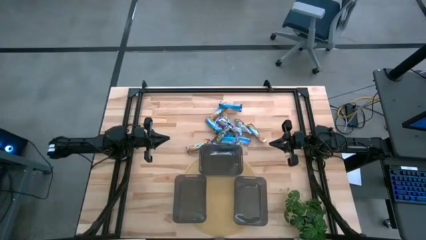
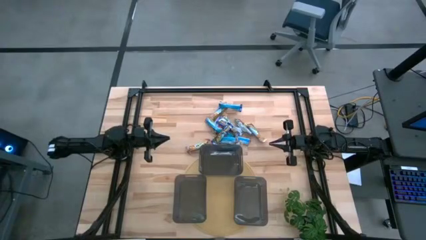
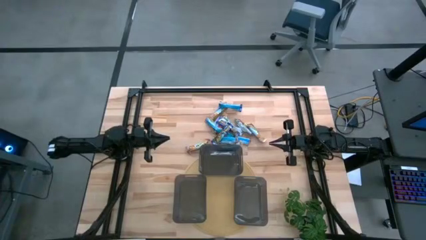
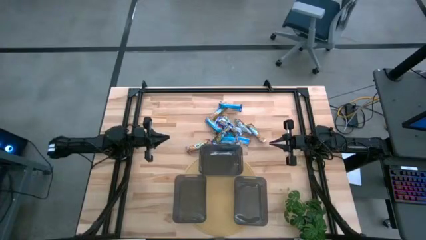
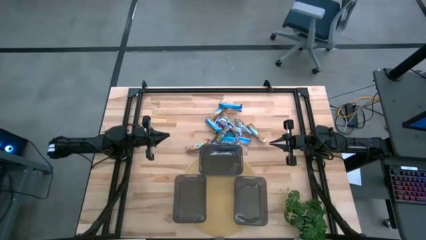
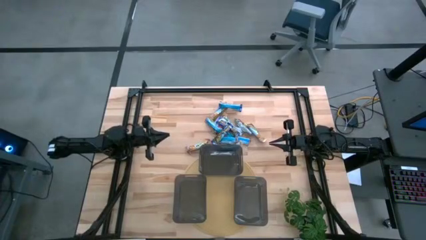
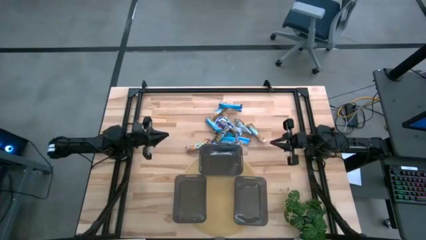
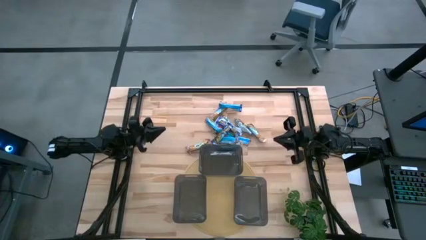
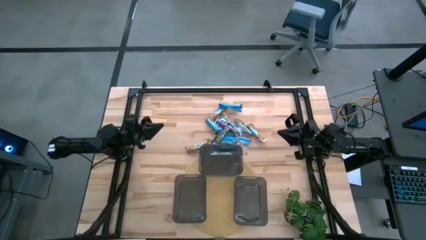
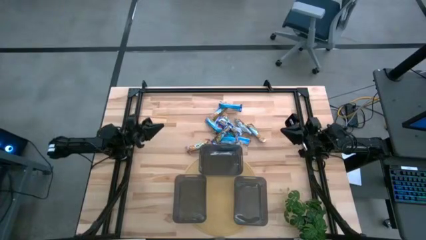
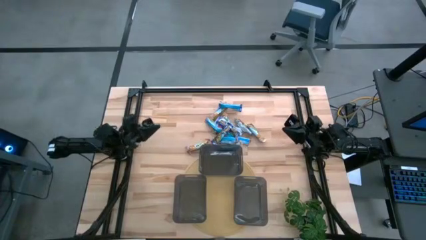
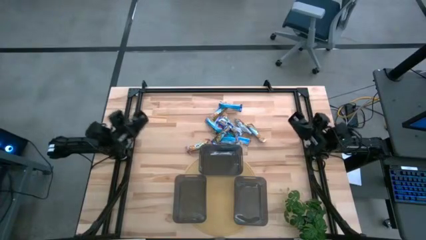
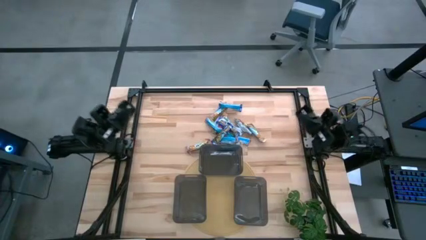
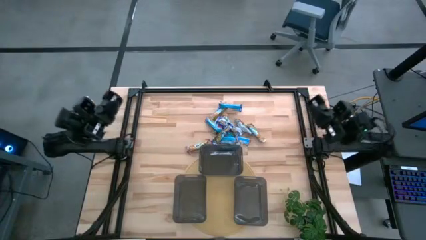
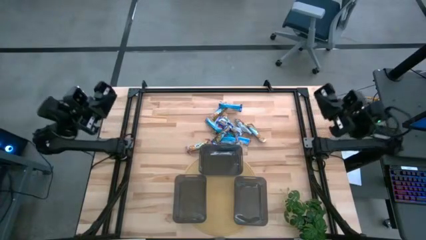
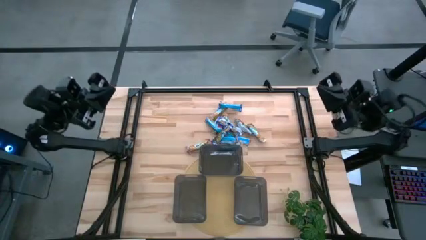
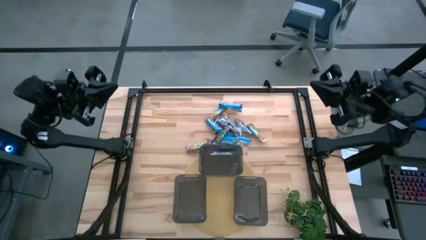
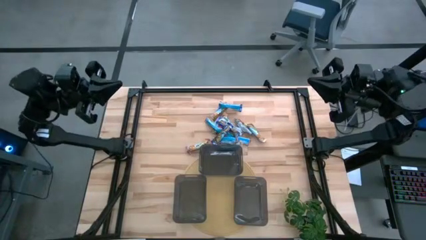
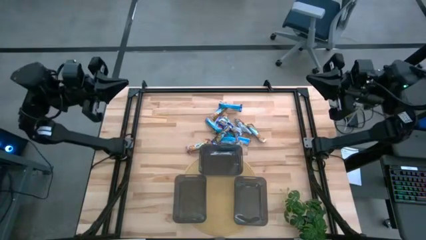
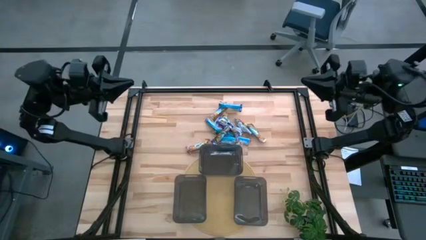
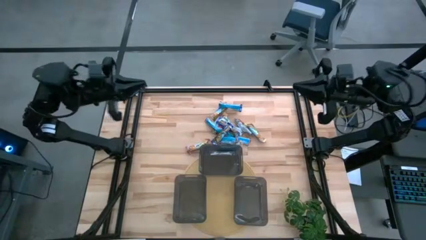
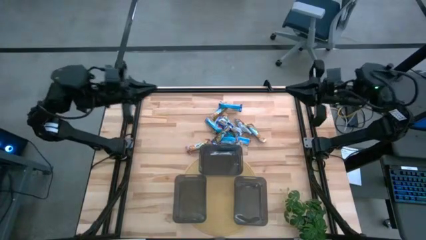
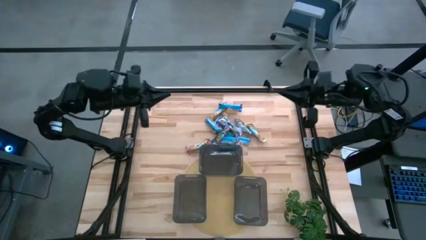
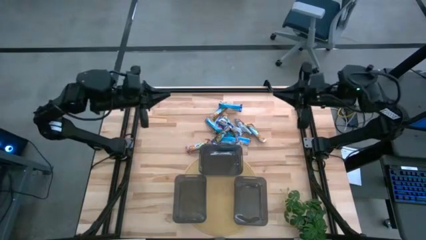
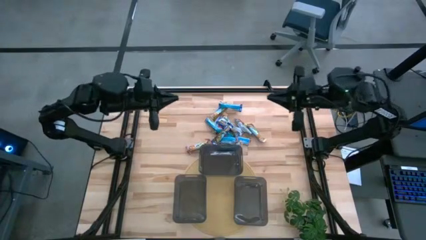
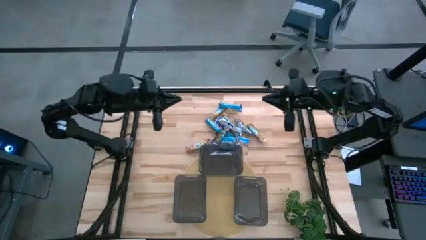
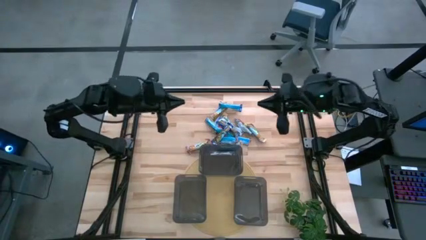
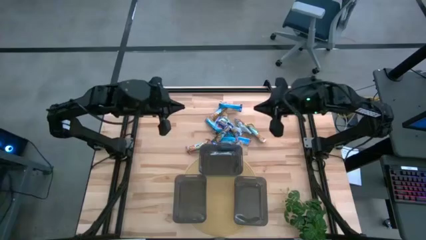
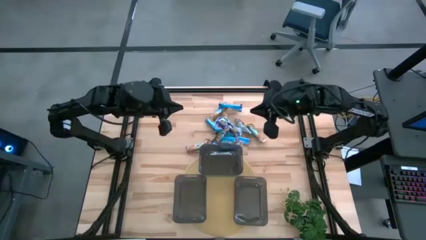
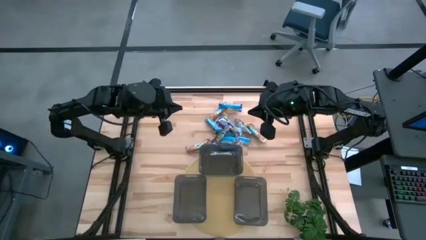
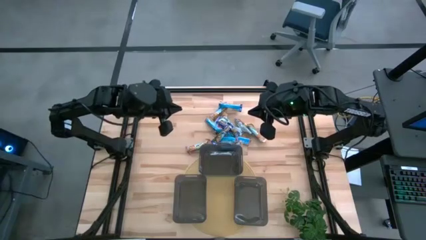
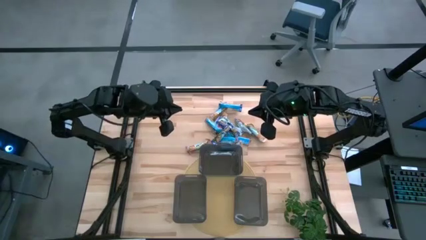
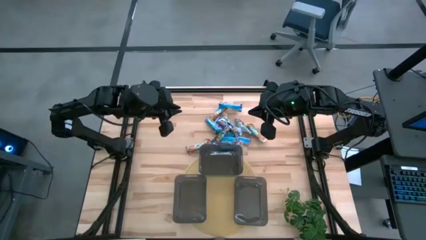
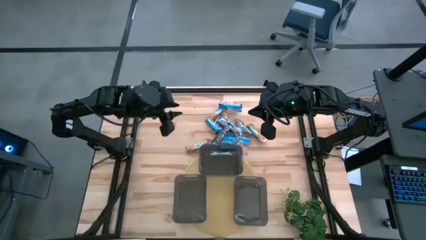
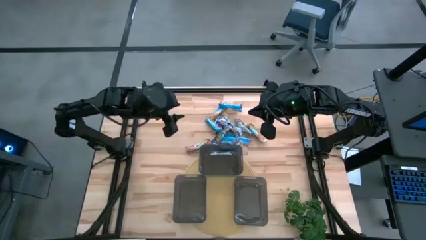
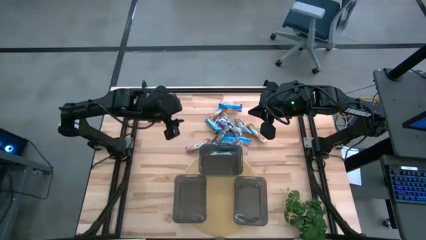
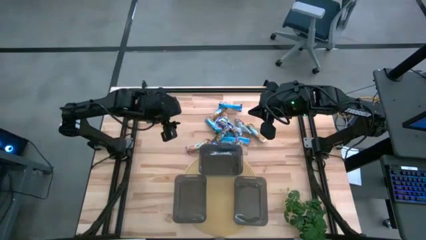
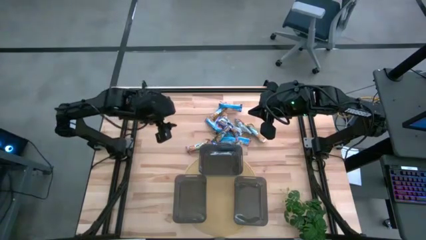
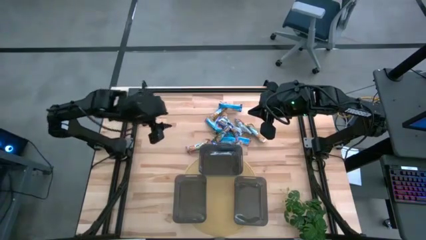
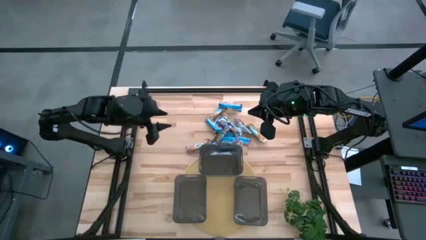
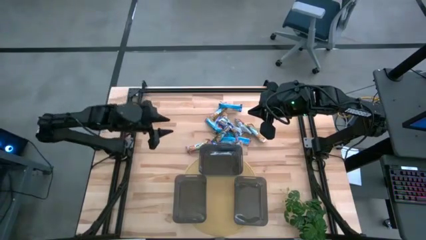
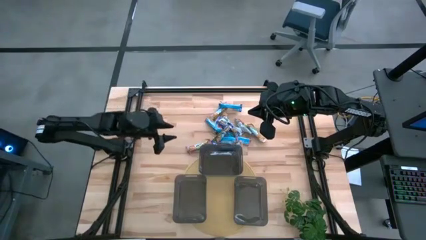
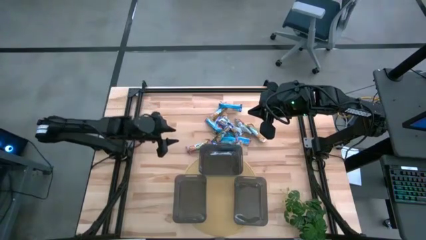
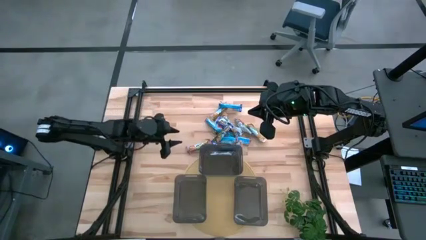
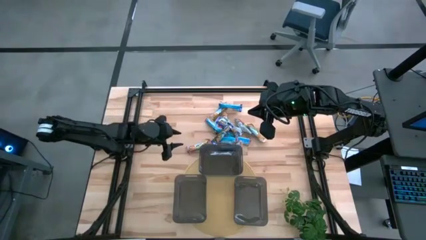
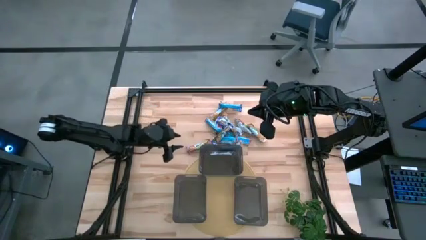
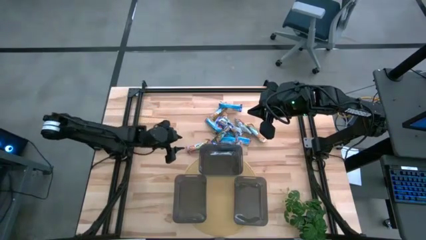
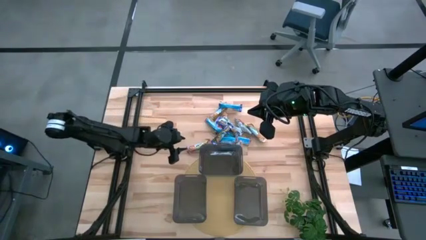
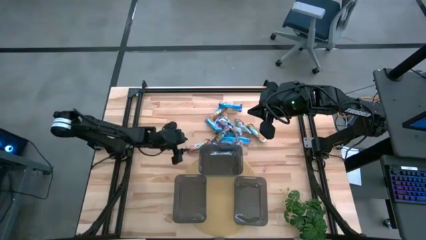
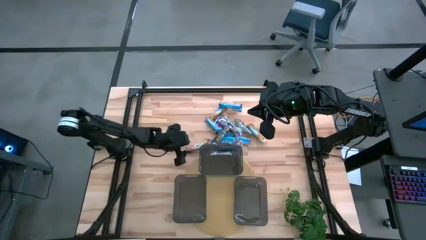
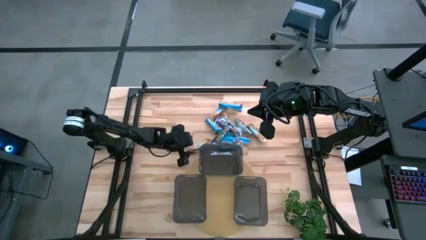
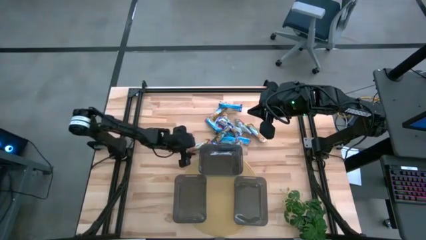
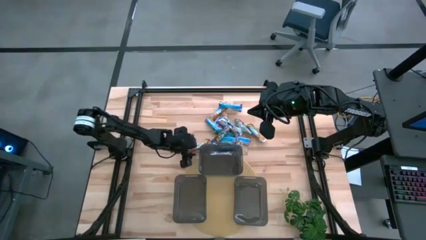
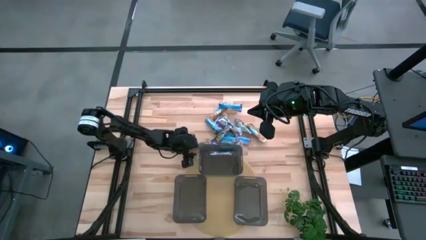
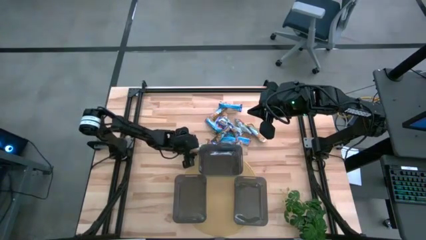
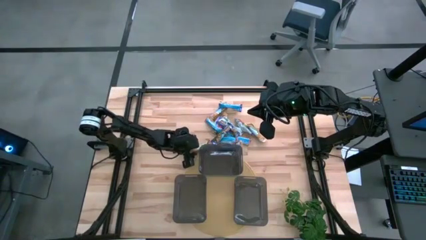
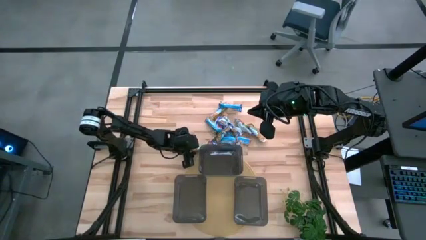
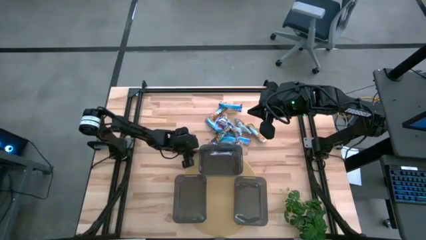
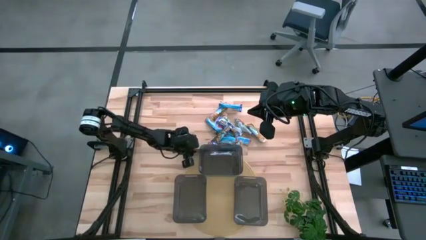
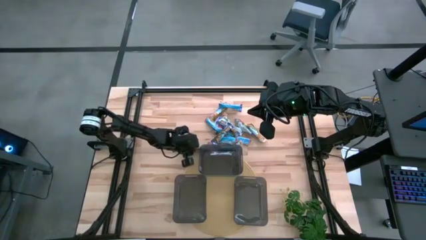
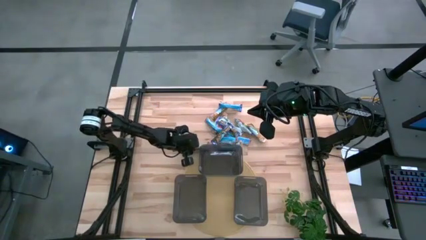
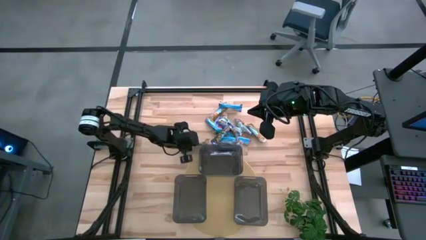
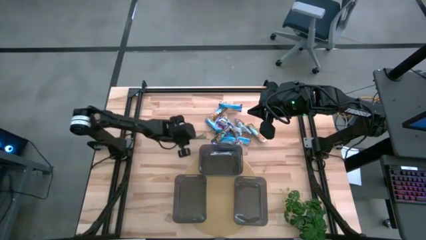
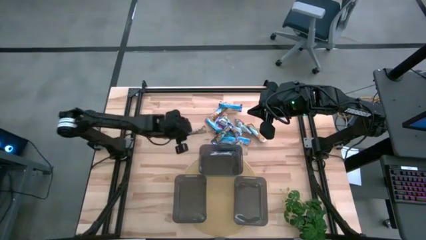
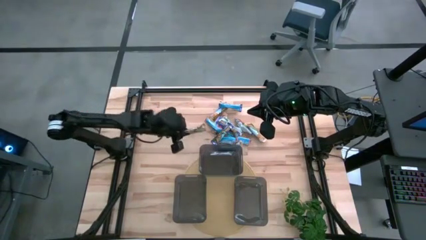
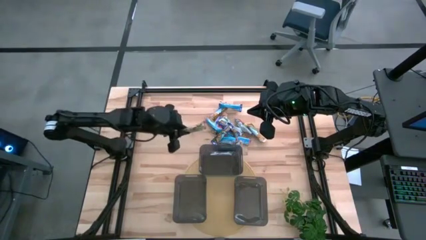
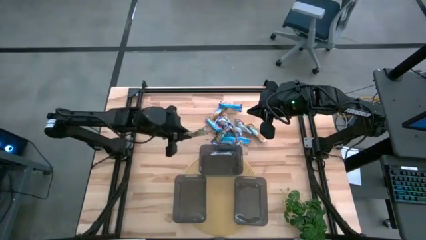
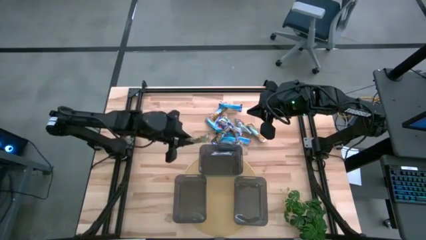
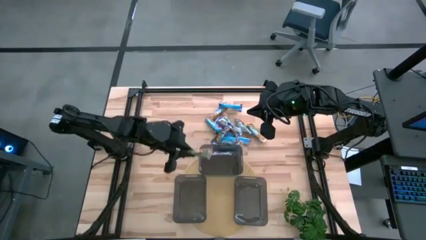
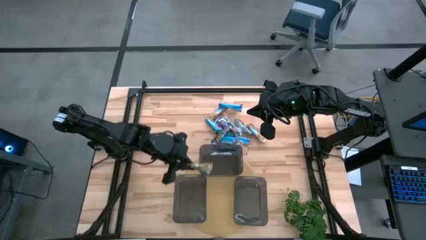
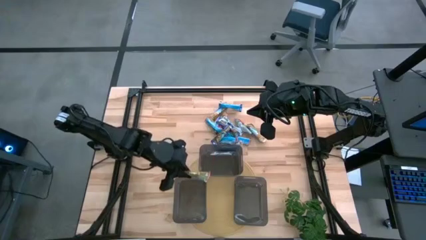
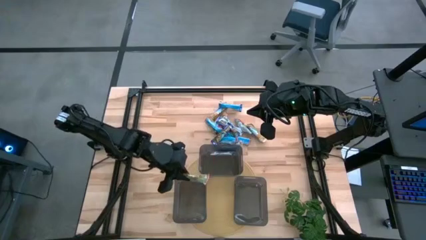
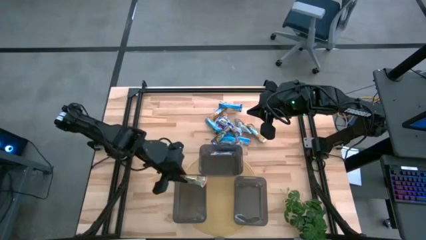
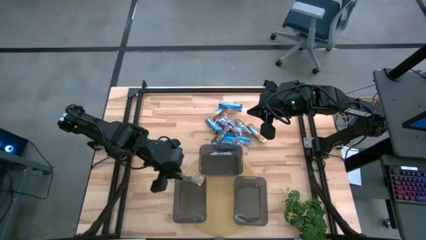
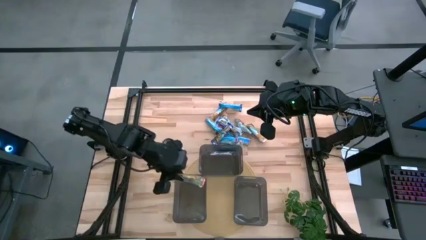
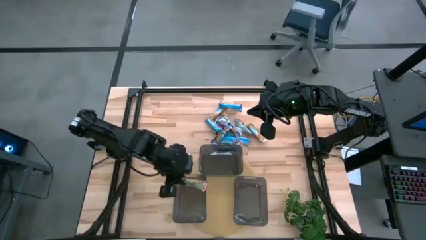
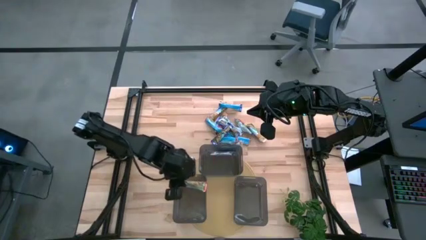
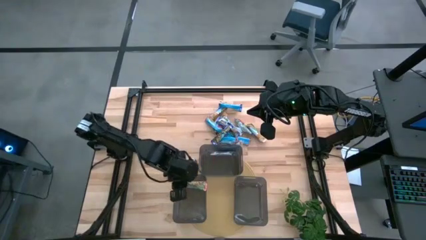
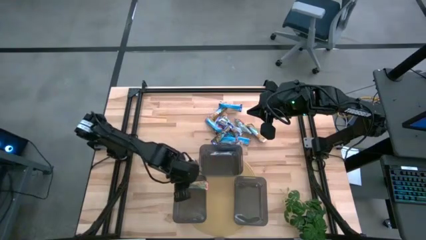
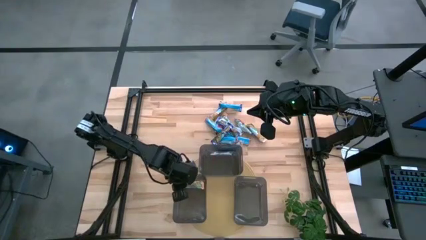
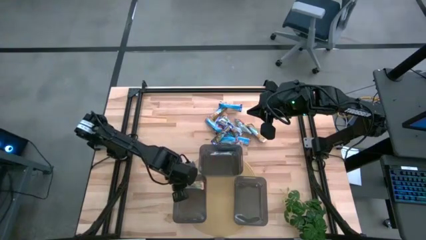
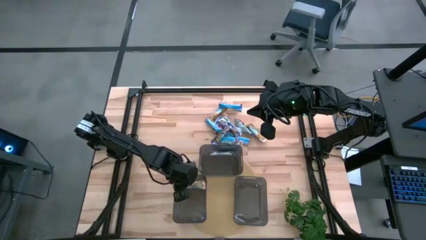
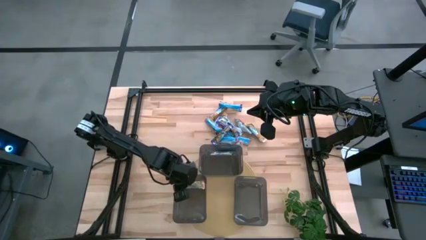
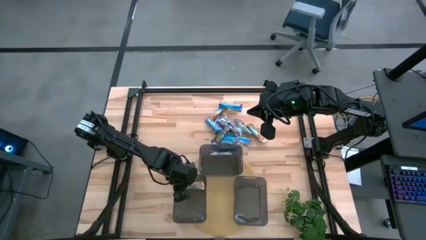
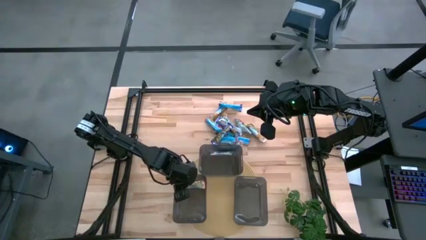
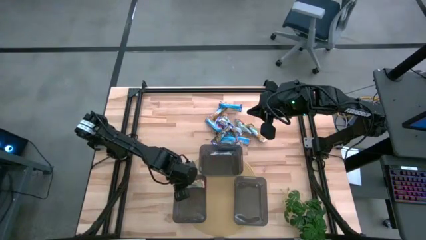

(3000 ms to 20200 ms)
Task: Pick and place Granola Bars by type
Put the red granola bar into the bottom left black bin
